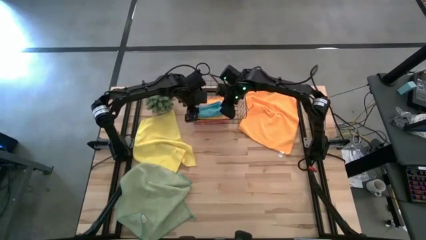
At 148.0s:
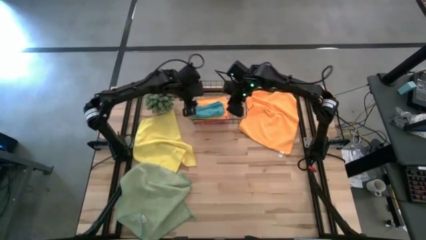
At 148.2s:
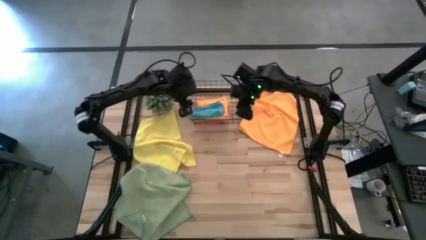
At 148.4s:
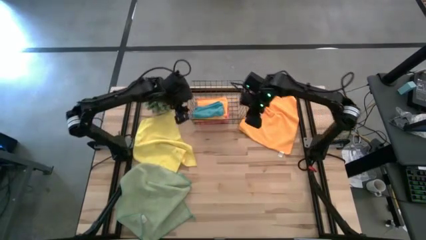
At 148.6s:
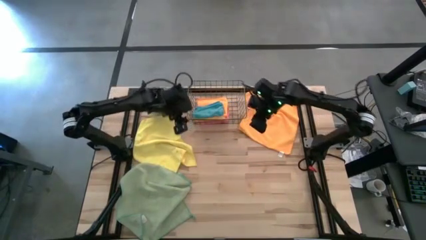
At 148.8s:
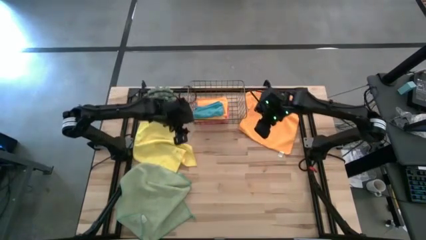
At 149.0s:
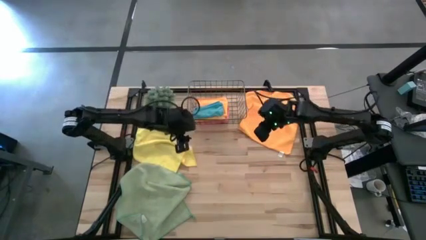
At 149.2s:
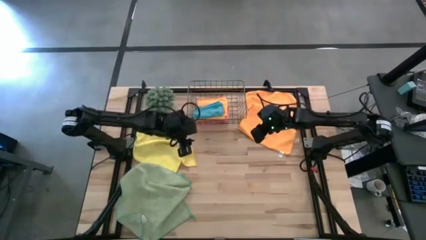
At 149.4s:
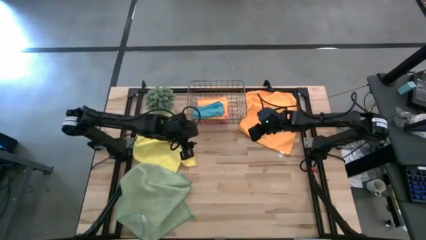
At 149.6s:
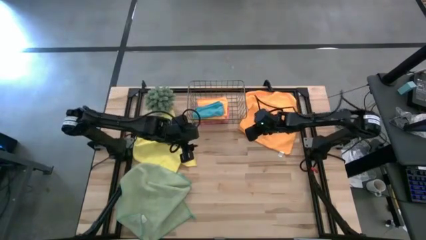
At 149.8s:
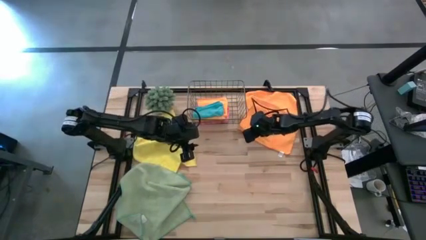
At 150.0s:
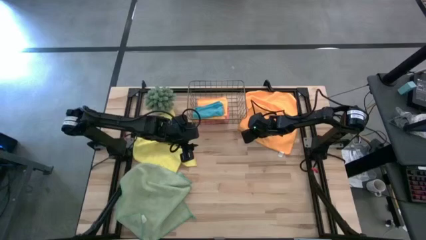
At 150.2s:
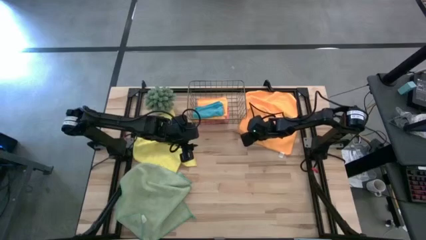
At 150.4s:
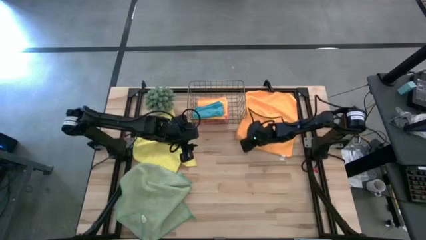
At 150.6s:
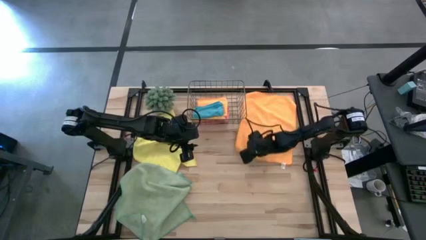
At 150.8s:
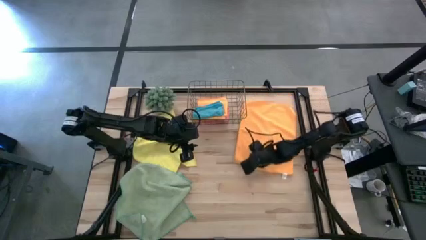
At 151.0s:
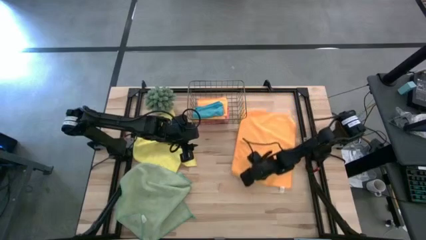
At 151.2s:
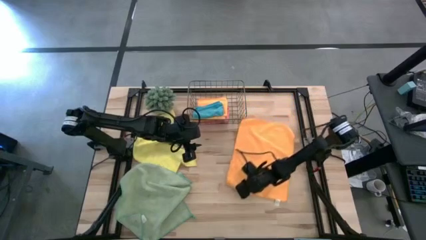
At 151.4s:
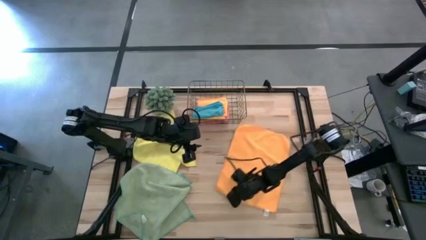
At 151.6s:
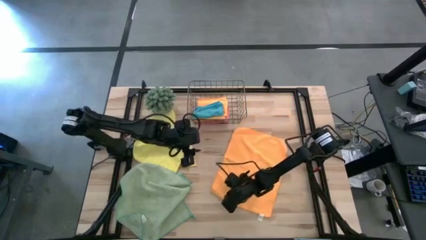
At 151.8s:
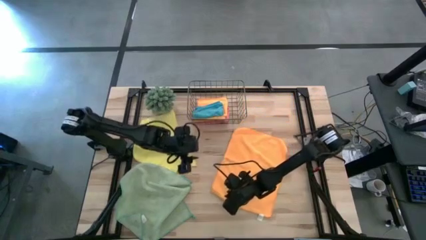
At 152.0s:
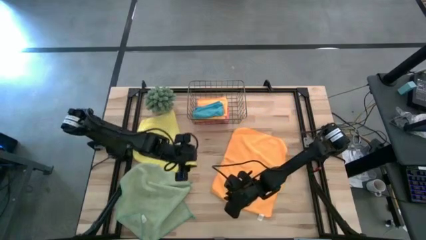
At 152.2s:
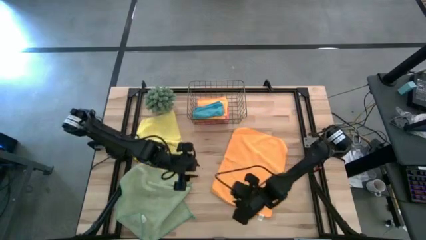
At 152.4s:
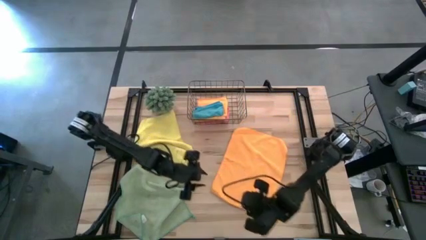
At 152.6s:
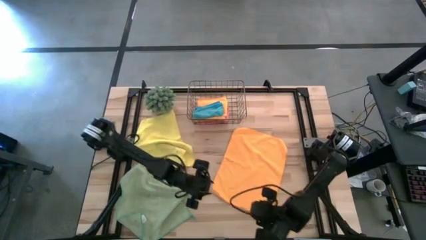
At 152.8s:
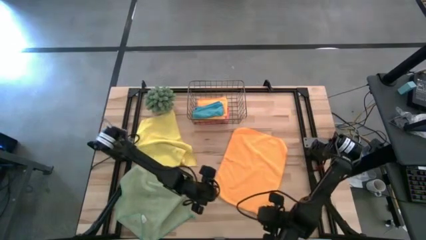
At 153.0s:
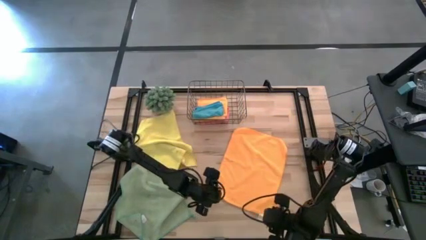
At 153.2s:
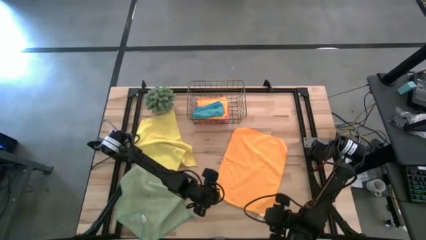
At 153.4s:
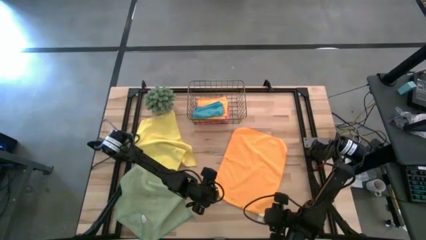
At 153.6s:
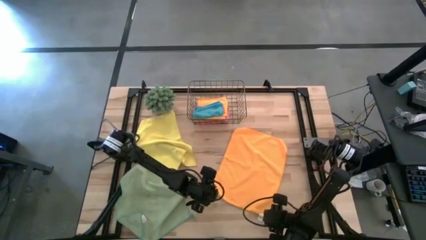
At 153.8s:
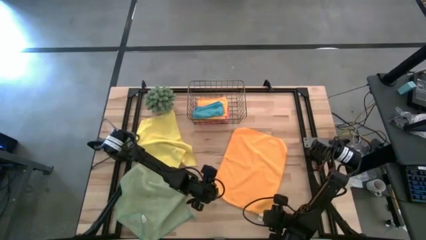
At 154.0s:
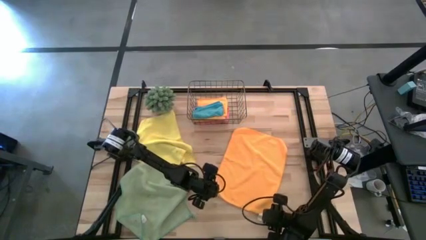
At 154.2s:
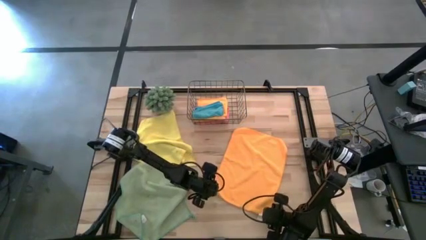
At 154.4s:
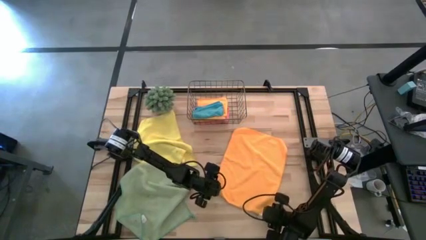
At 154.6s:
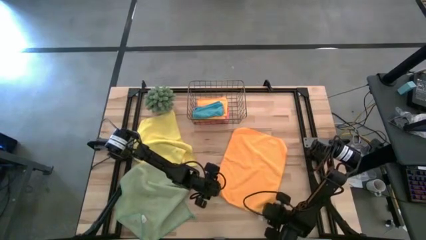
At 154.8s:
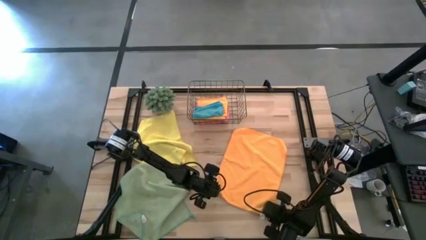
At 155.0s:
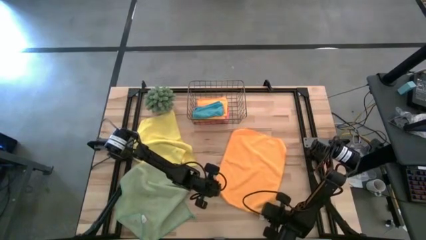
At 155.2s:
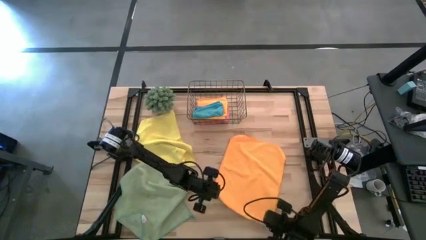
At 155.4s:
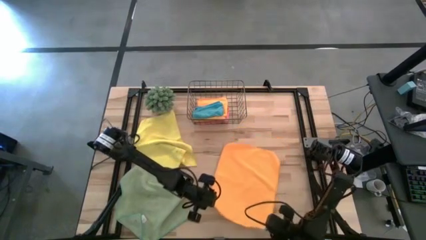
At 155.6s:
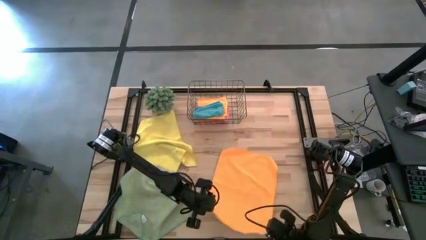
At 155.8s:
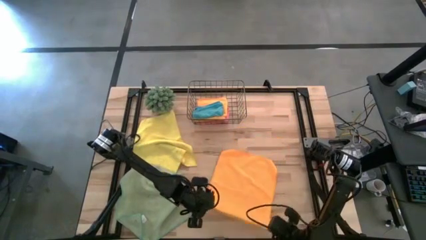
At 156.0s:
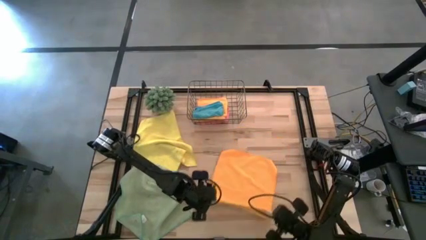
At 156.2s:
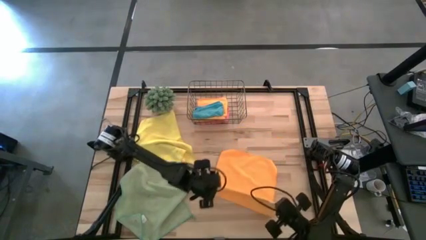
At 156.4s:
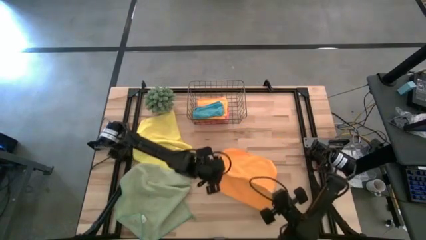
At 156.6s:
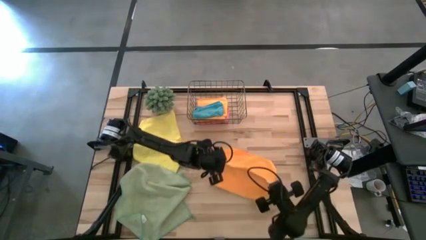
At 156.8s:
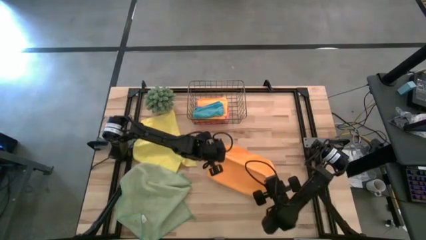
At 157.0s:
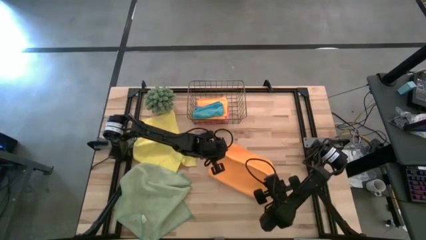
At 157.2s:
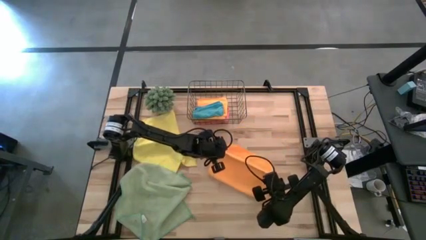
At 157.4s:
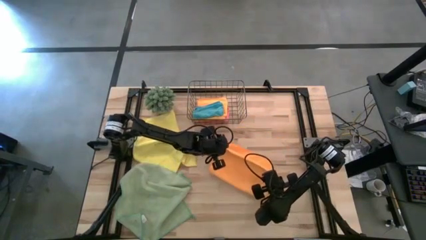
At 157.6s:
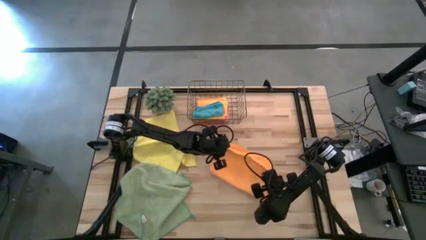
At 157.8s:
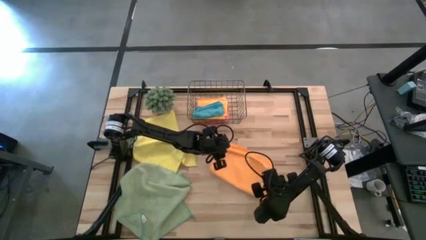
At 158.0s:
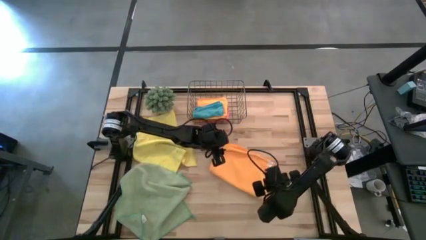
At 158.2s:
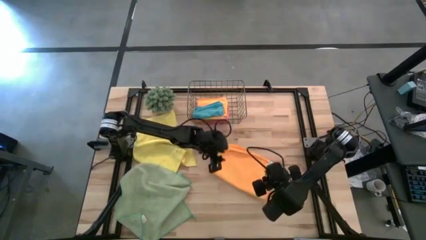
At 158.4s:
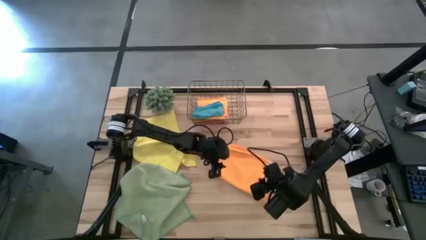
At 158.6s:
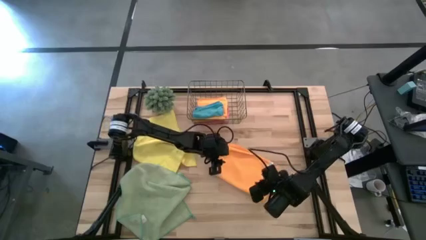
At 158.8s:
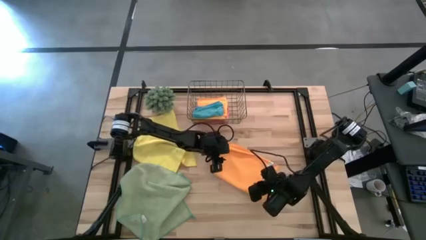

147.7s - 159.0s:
Task: Fold microfiber towels
Fold the orange microfiber towel

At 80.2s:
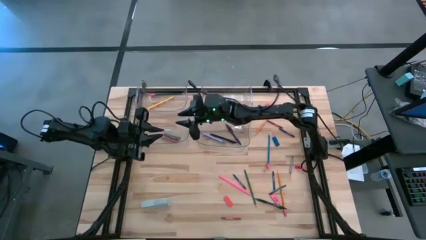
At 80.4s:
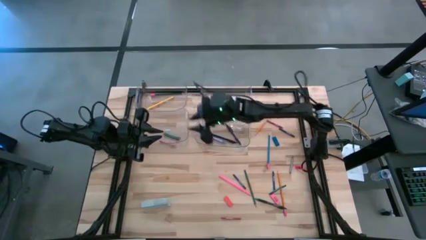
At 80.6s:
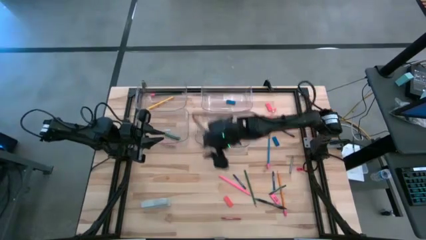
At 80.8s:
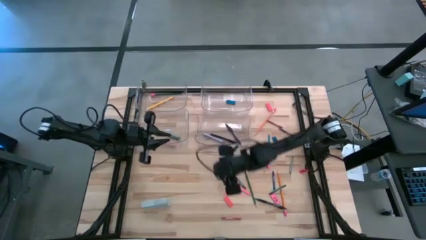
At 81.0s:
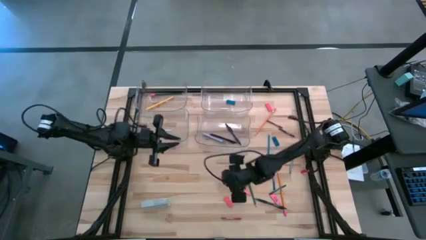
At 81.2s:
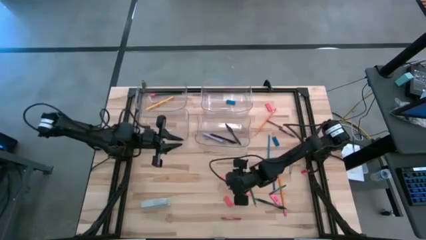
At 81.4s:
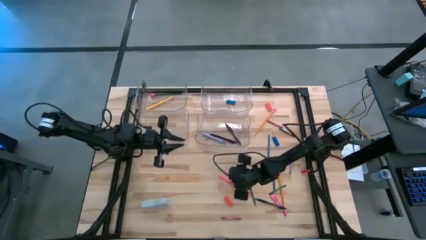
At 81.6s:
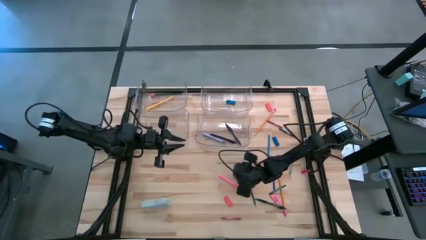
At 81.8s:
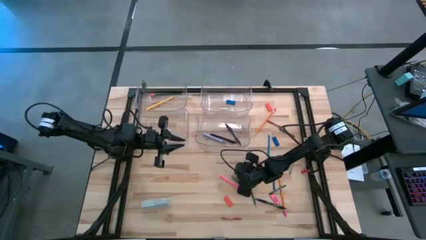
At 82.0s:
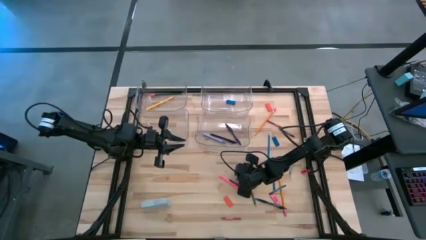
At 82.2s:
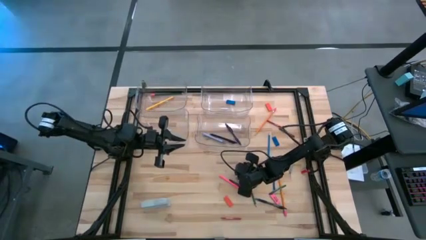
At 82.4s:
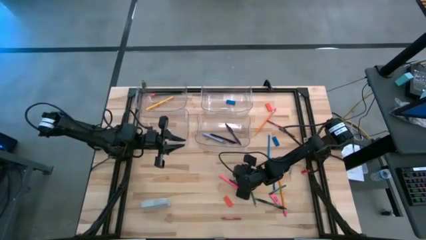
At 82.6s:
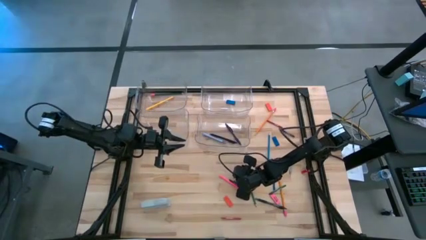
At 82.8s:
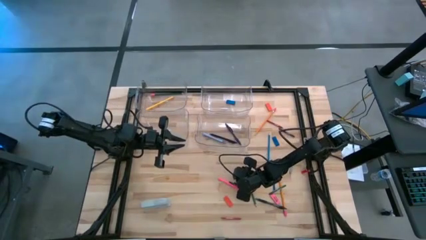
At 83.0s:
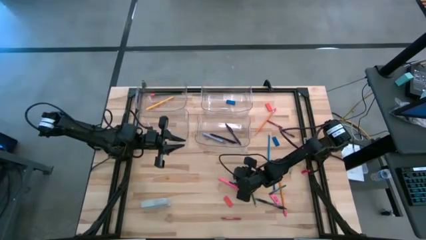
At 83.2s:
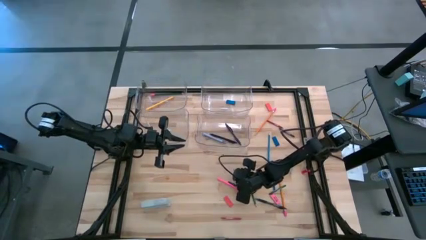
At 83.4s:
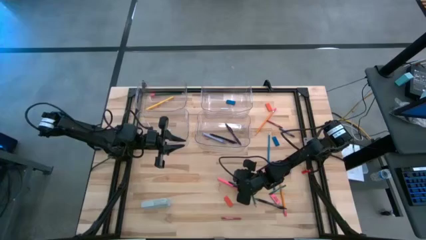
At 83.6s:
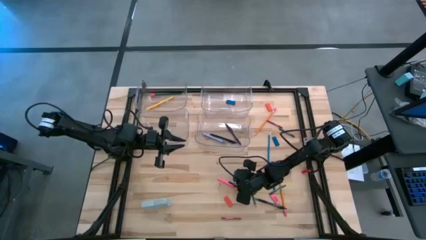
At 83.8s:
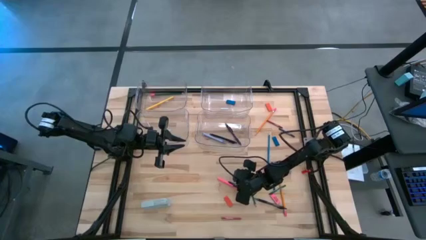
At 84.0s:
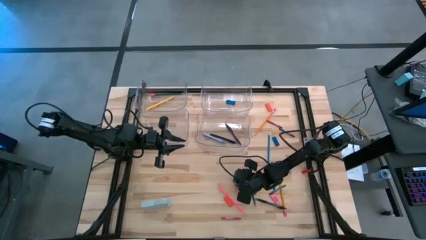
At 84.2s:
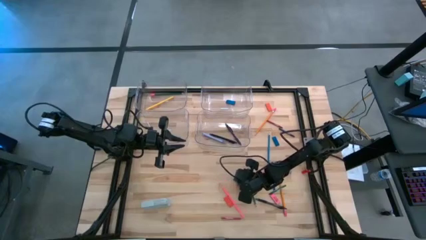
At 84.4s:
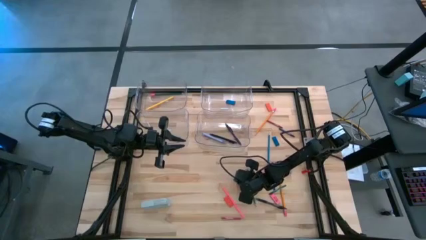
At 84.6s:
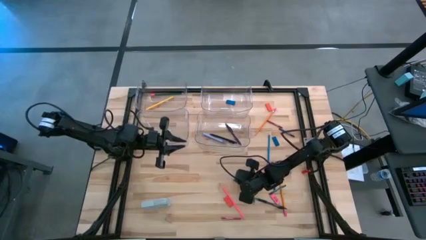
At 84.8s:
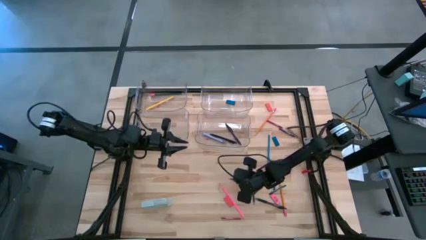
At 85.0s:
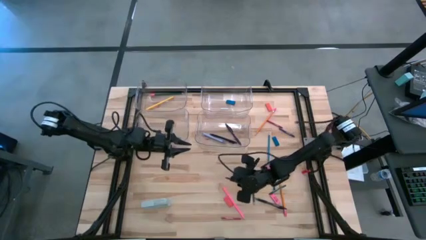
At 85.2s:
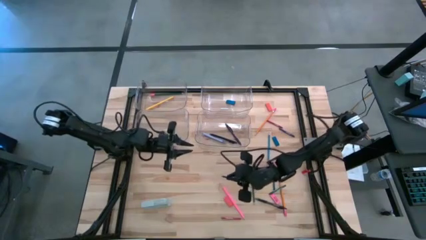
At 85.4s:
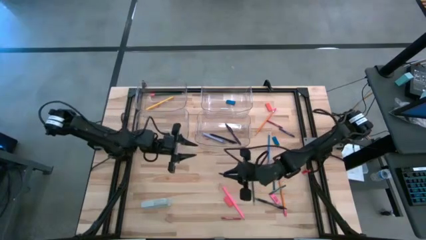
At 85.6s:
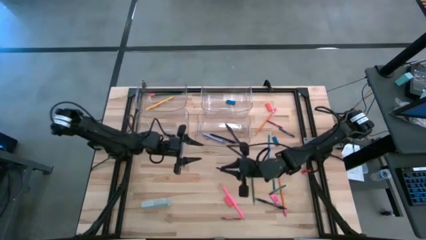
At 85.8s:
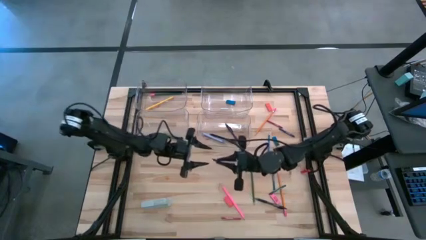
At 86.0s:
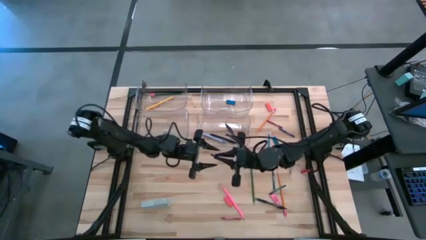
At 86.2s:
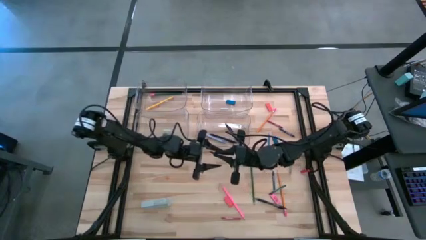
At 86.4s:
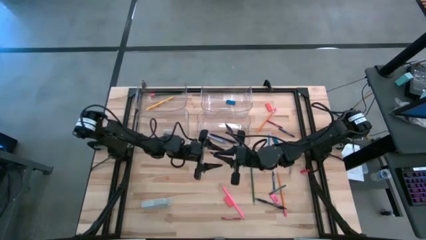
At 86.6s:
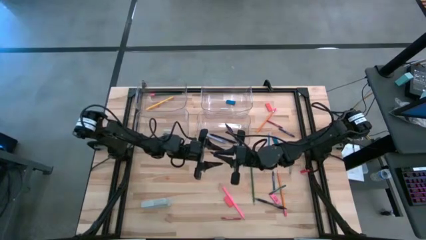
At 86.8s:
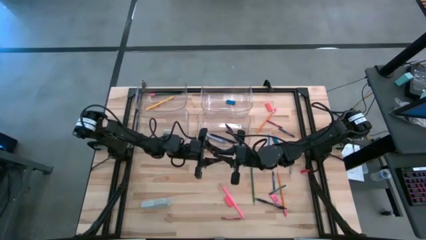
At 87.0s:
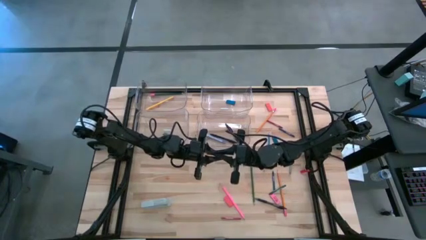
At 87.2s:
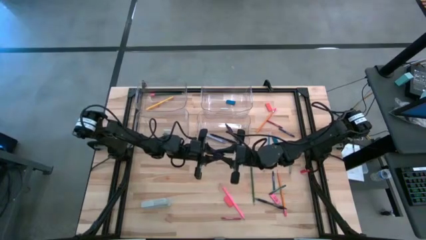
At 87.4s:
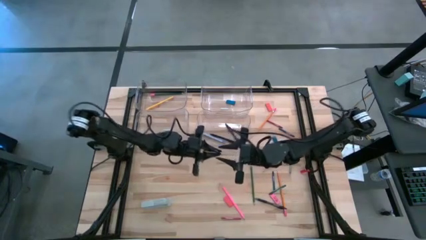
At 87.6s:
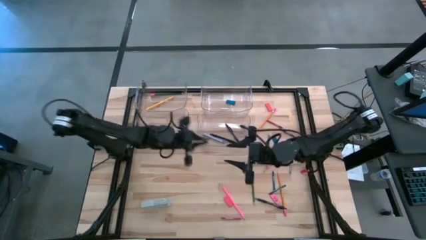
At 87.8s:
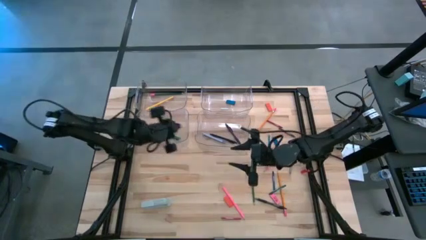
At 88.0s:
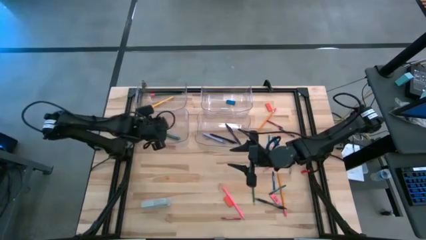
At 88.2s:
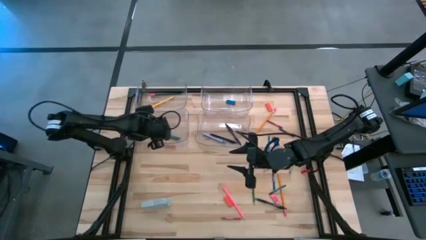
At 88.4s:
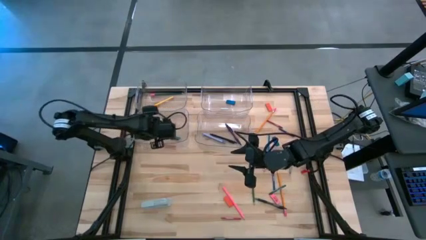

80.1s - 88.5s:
Task: Sort crayons/erasers/pens/pencils in bins
Put the left blue crayon into the bottom left transparent bin
